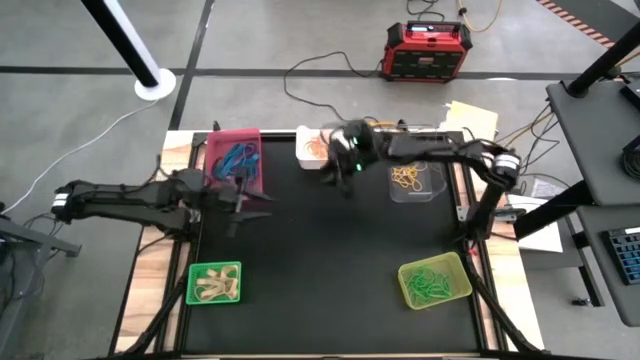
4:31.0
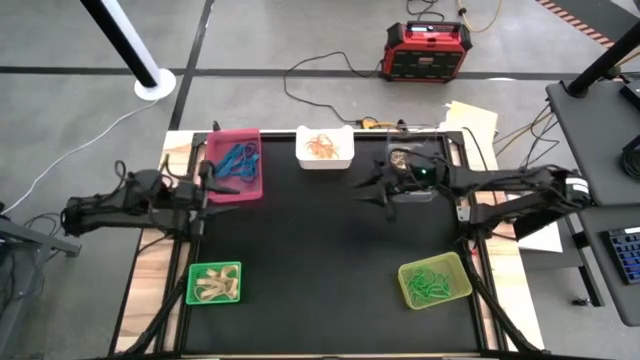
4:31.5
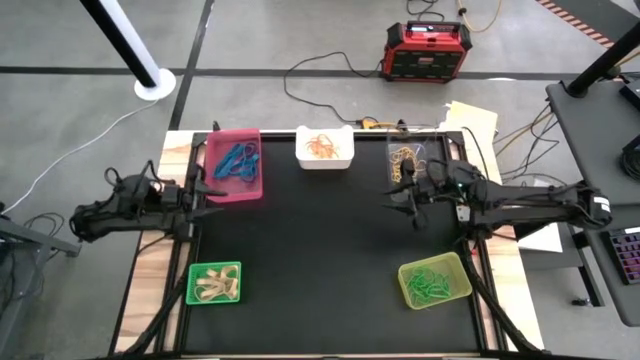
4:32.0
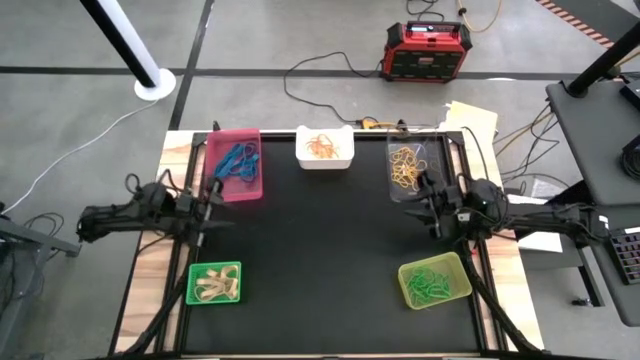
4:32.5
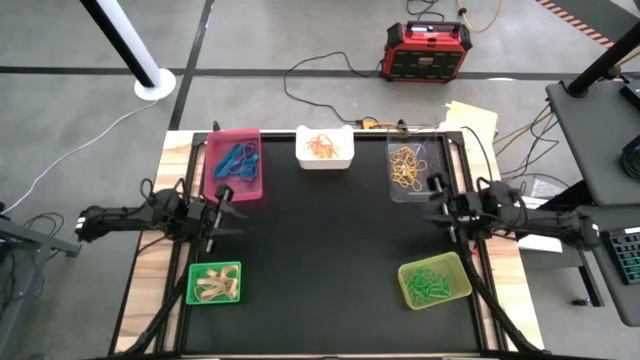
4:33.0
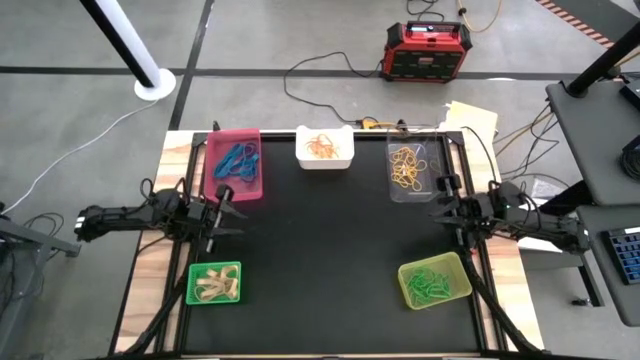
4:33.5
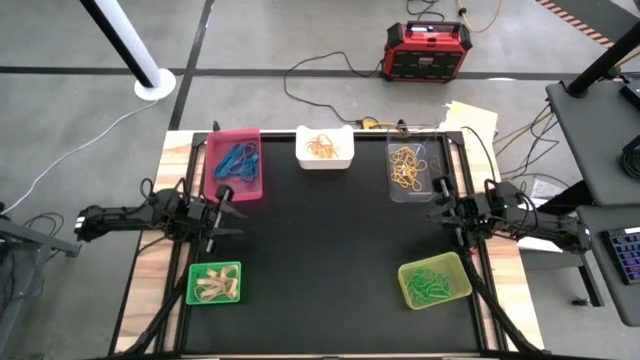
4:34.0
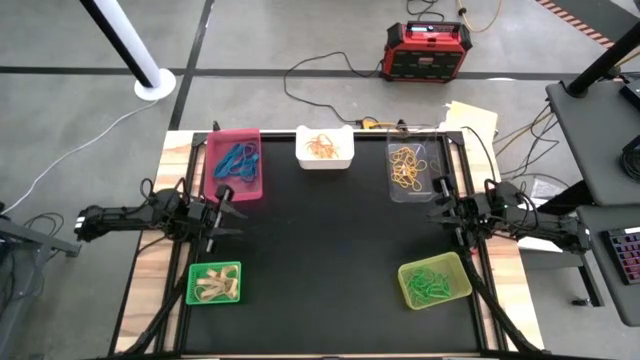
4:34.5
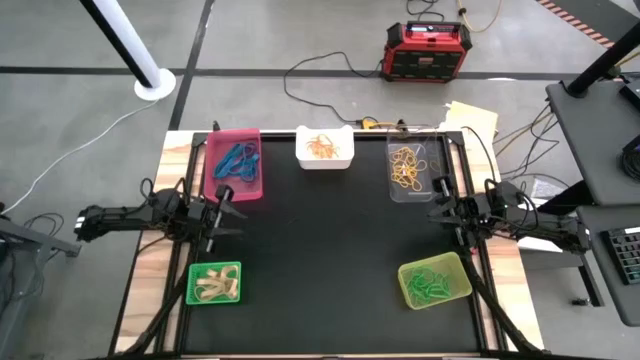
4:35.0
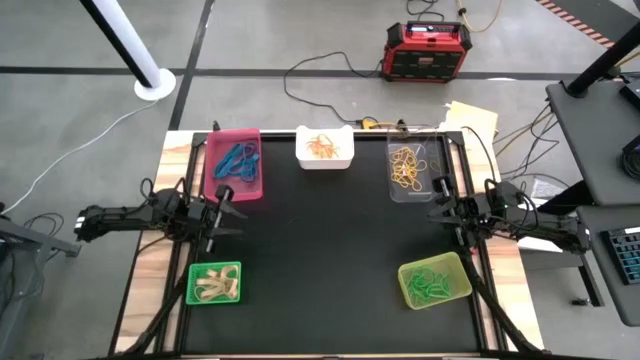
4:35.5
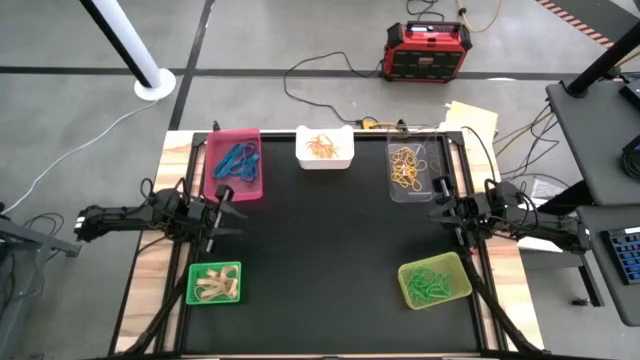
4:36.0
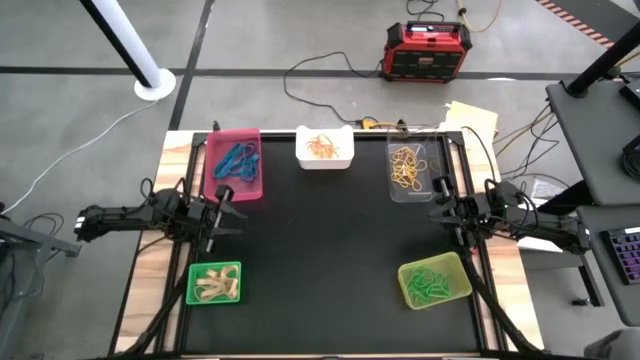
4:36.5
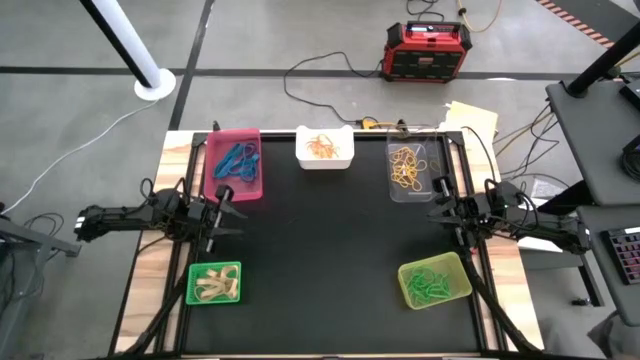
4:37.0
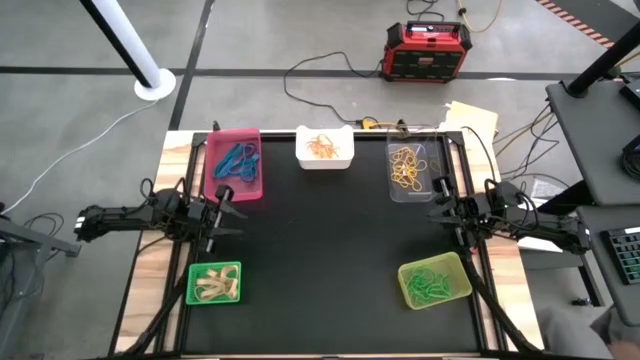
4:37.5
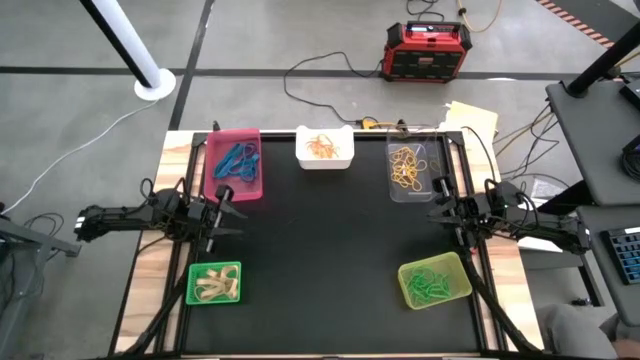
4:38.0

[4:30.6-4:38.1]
Task: Sort rubber bands into baskets
Return to Home Position

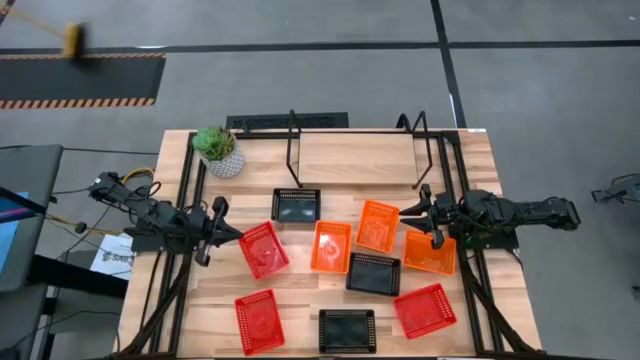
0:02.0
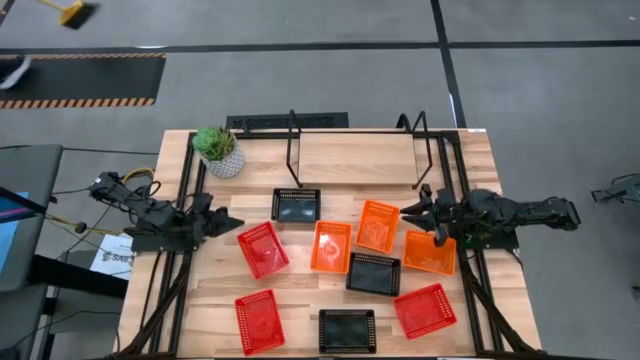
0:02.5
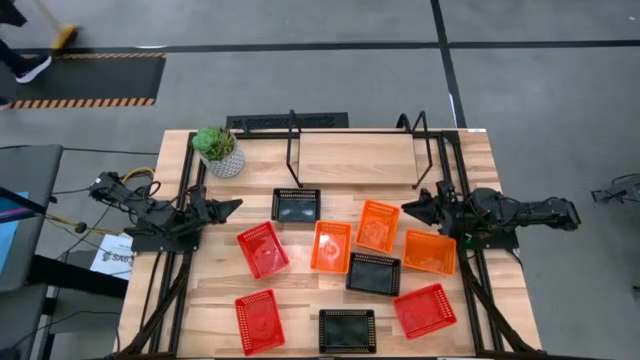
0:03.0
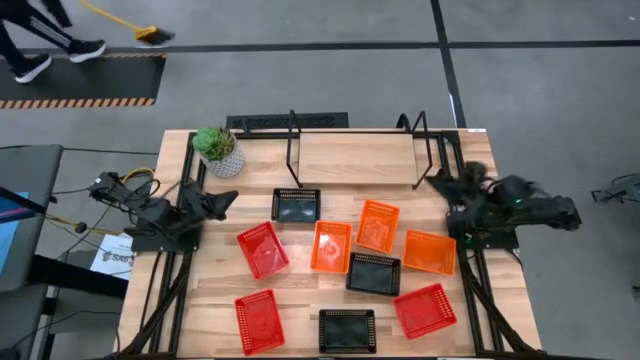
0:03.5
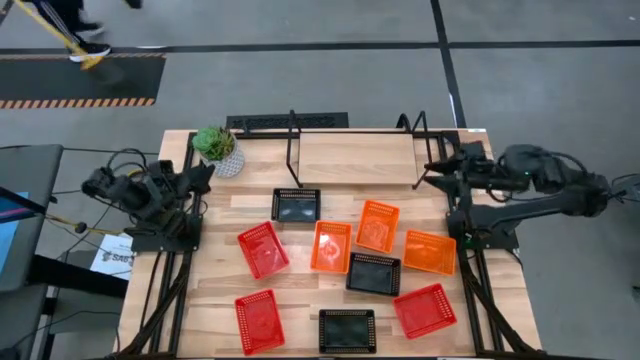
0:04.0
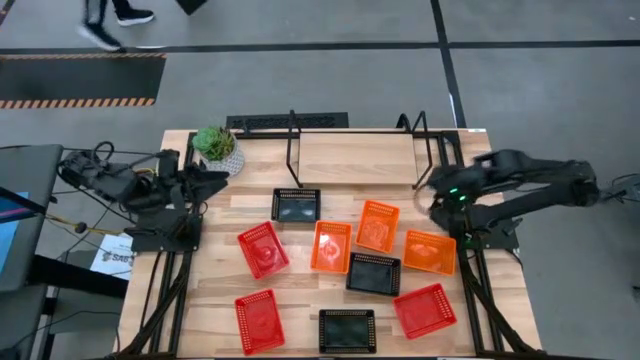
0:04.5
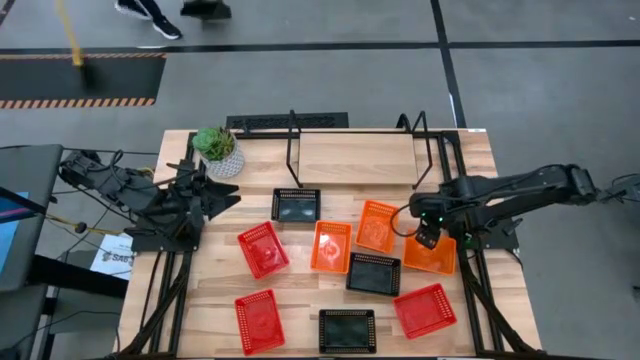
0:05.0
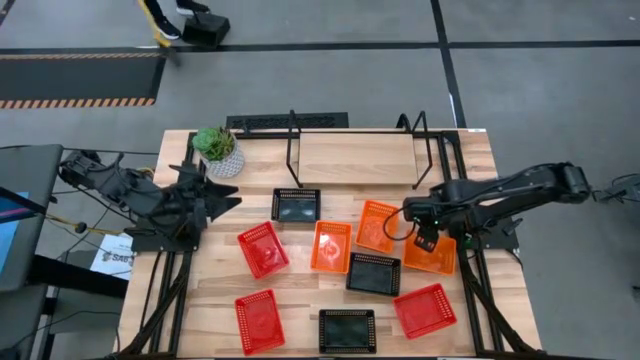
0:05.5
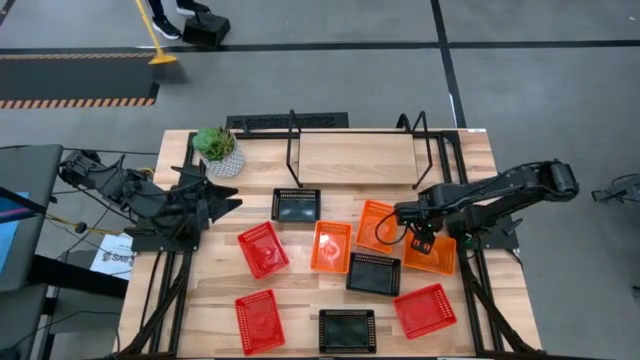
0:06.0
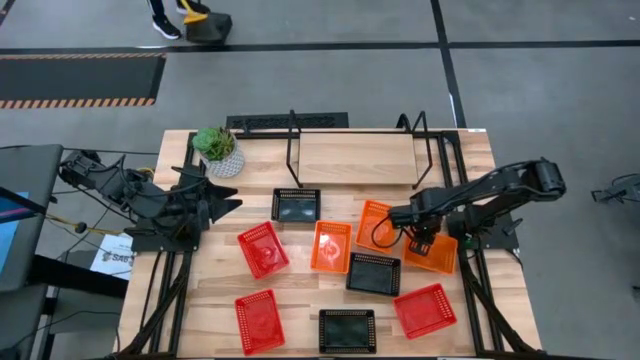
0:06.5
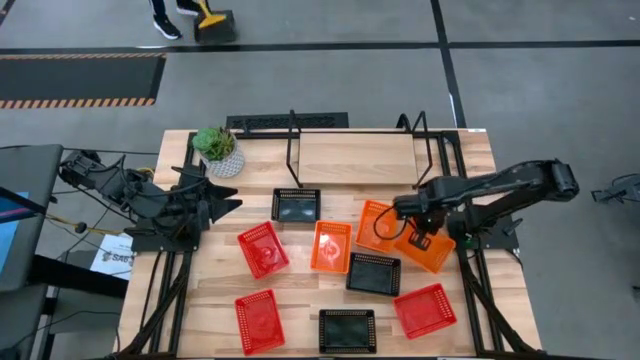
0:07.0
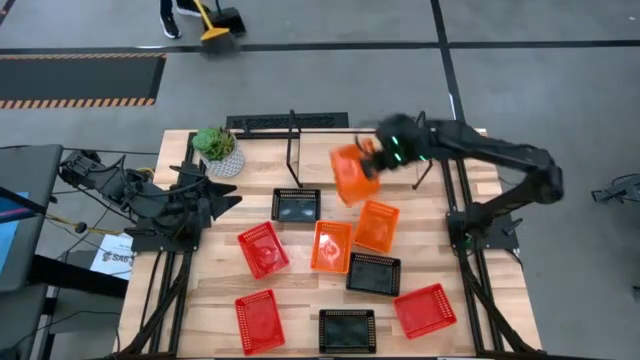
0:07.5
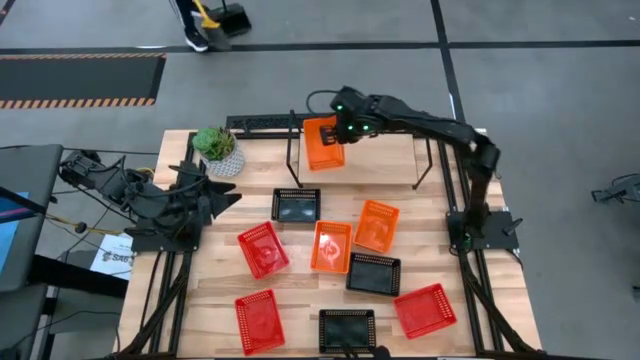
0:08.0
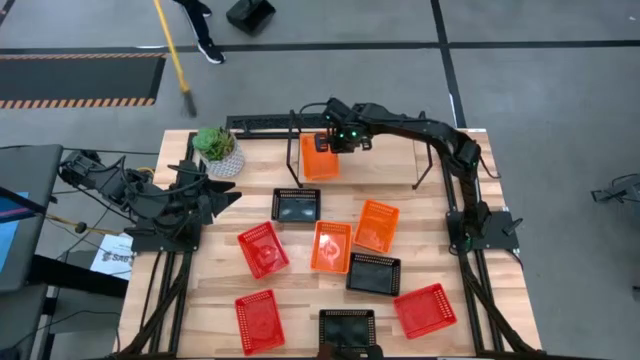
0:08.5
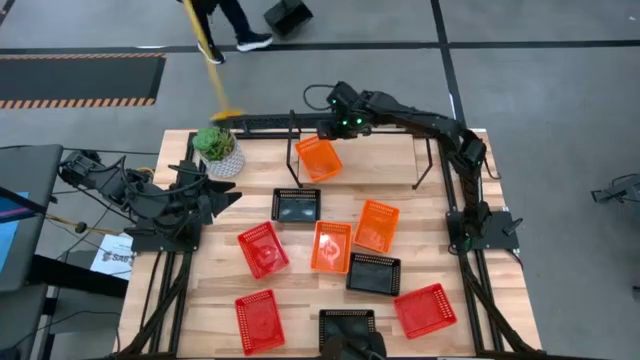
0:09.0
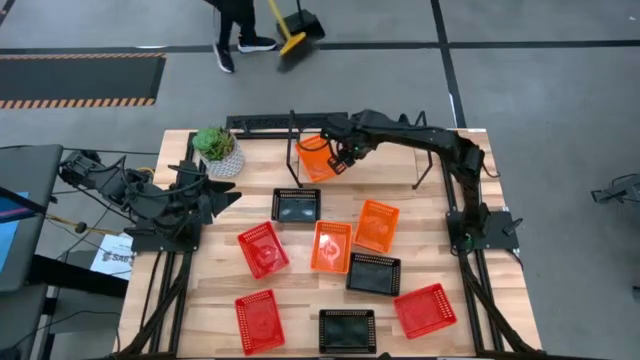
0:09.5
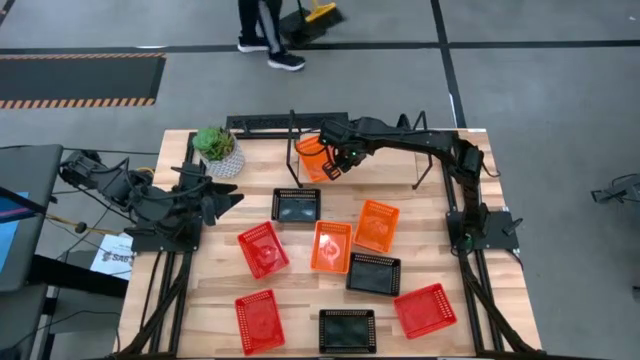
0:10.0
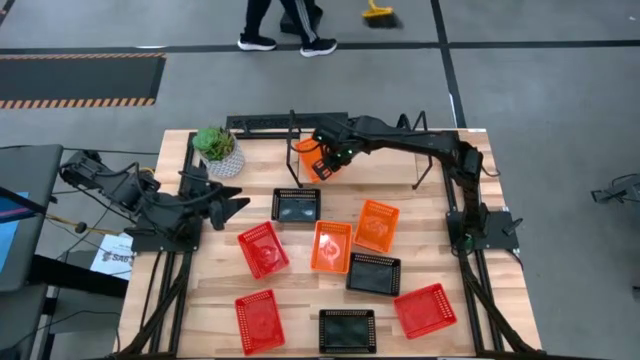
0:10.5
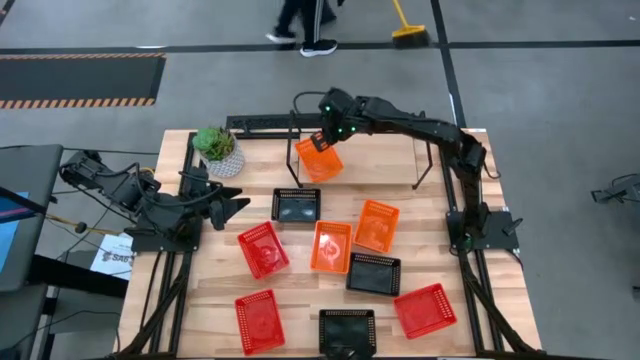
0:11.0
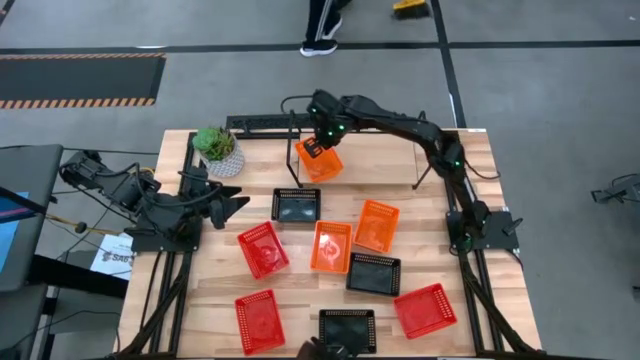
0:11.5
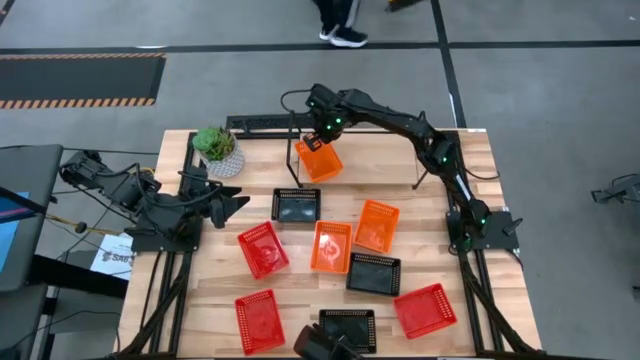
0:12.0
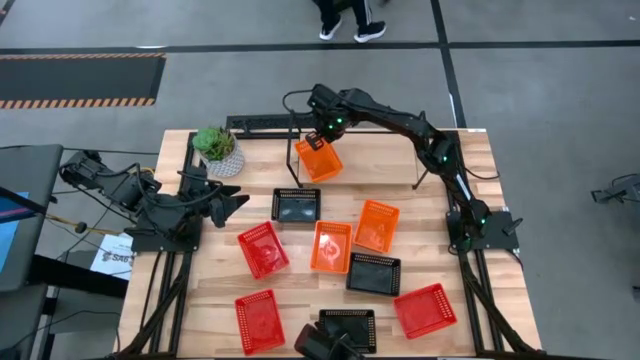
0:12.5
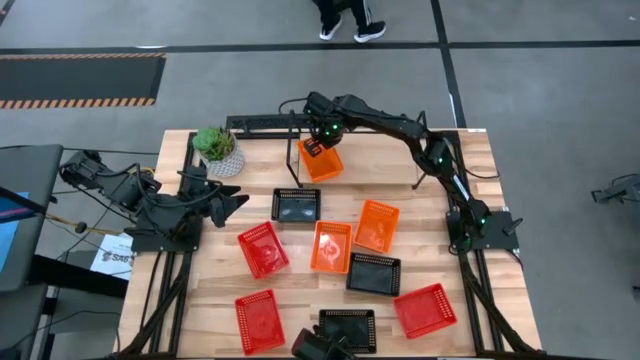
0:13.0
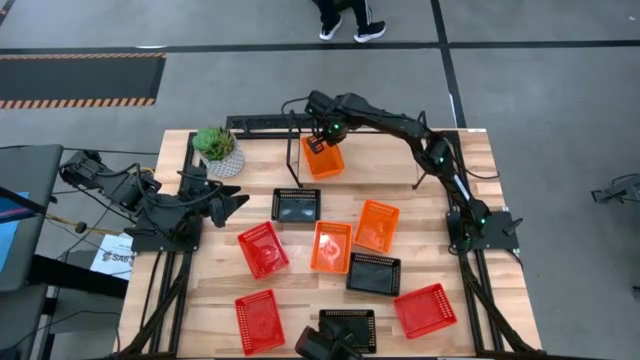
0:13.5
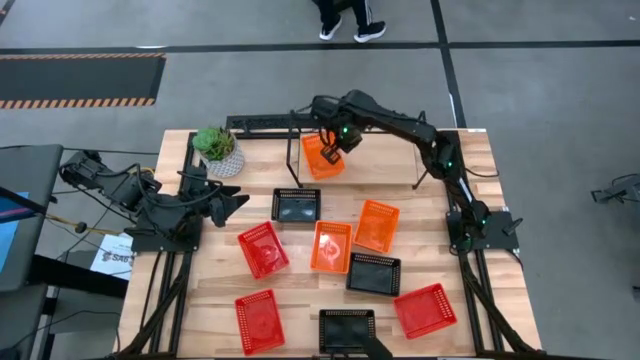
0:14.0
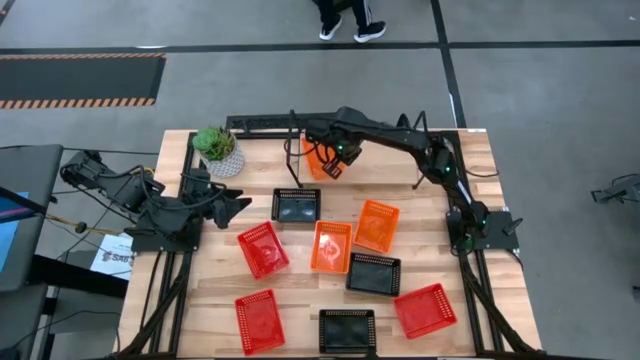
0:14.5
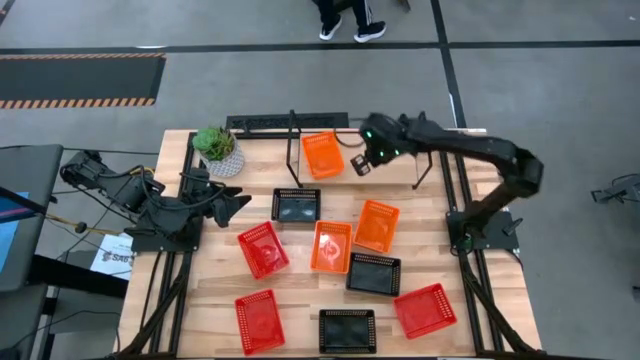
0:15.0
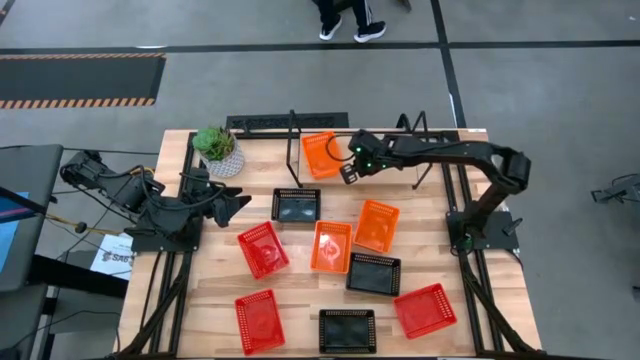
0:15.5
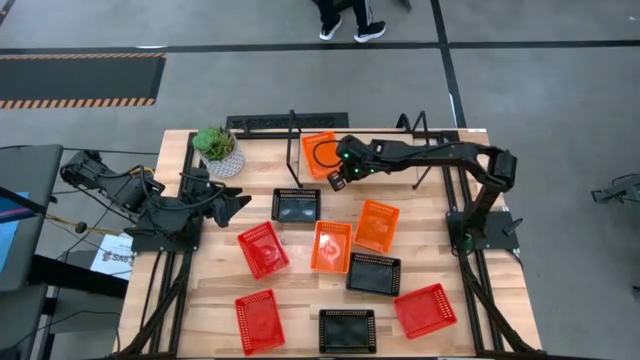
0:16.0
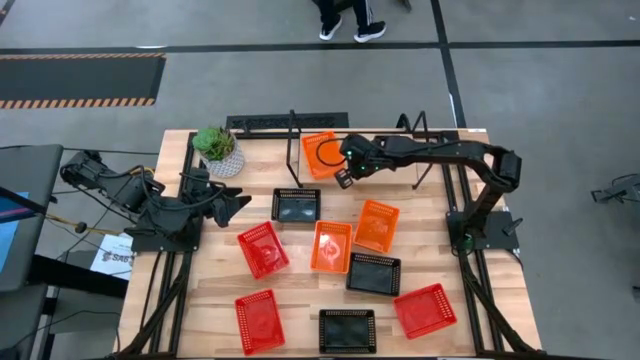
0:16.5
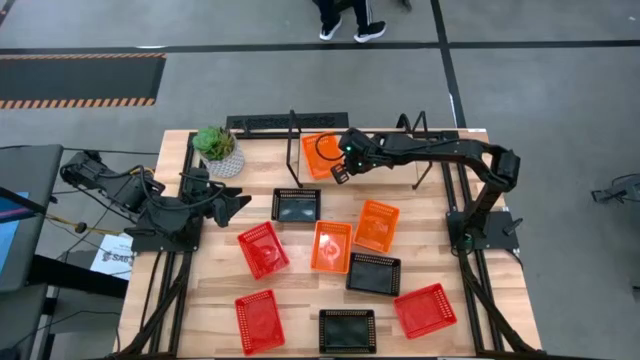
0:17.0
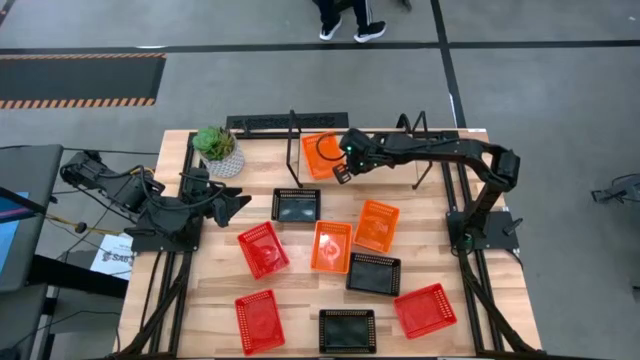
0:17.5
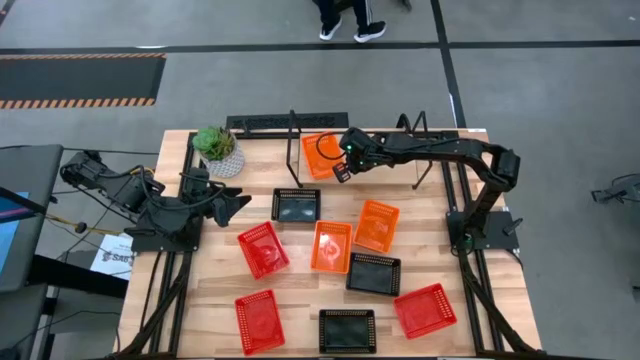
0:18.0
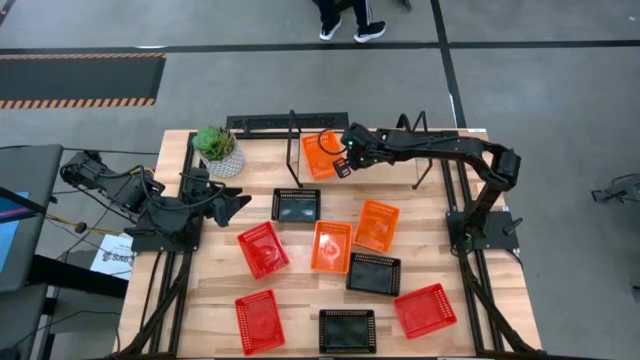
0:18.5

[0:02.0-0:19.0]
Task: Stack baskets on shelf by color
Put the right orange bin on the shelf
